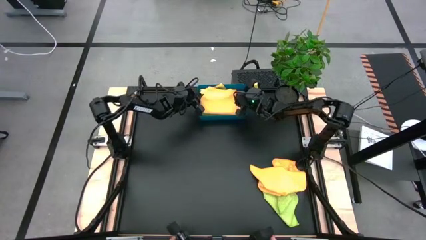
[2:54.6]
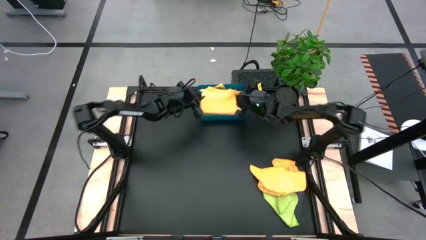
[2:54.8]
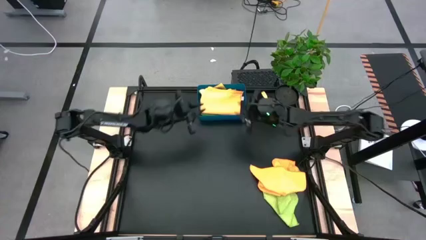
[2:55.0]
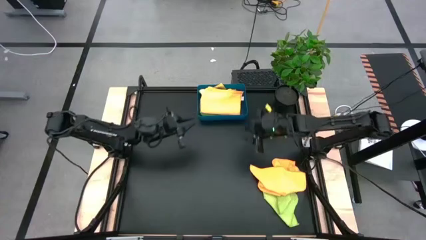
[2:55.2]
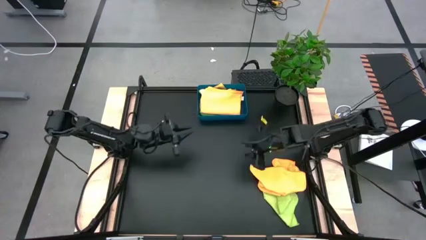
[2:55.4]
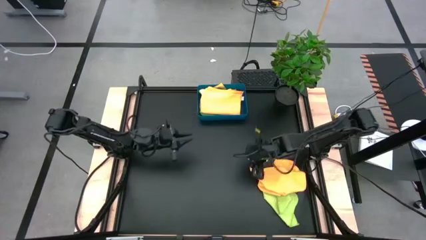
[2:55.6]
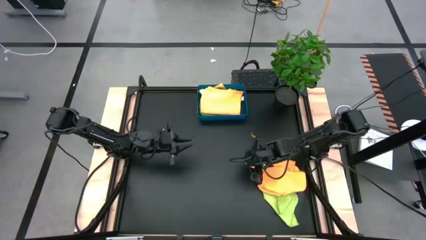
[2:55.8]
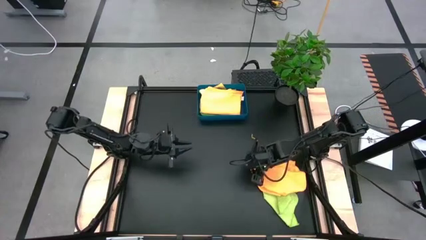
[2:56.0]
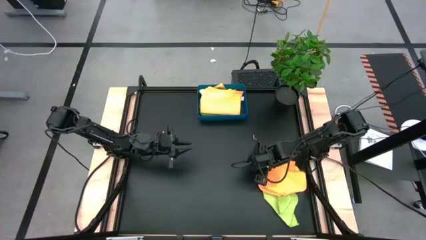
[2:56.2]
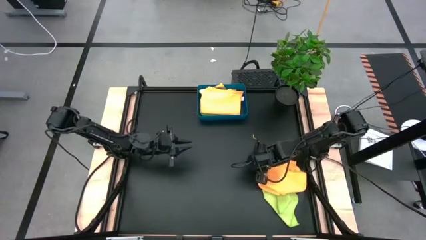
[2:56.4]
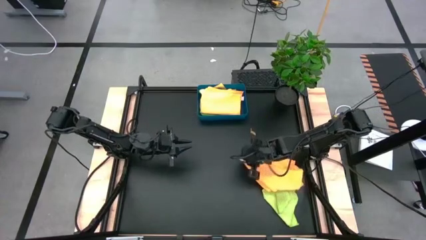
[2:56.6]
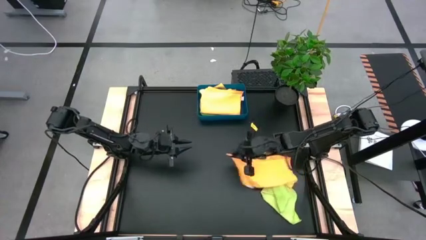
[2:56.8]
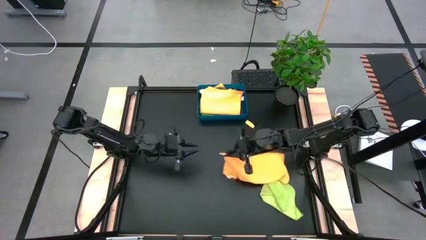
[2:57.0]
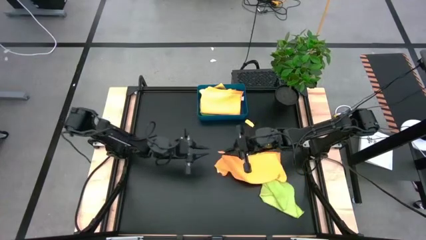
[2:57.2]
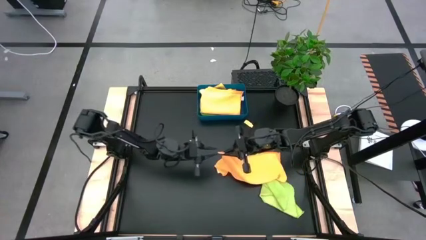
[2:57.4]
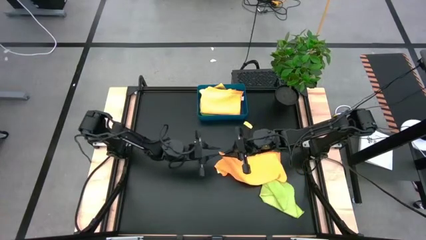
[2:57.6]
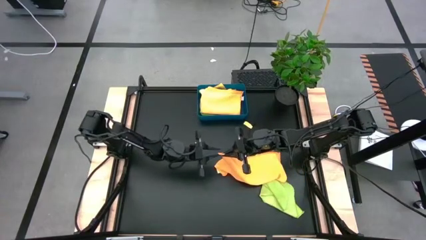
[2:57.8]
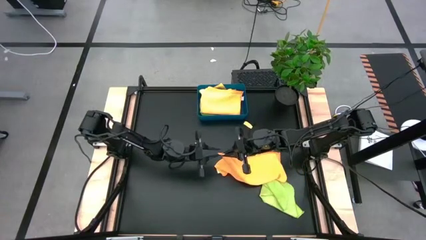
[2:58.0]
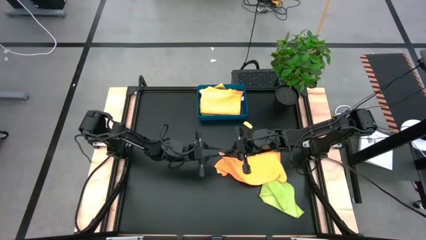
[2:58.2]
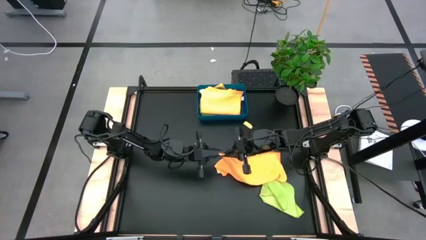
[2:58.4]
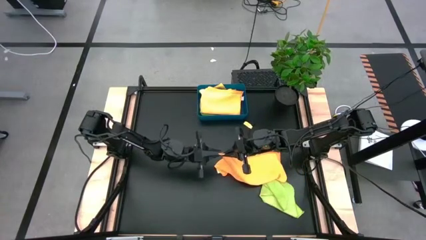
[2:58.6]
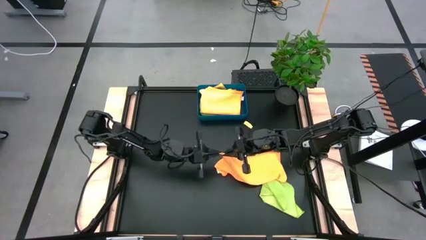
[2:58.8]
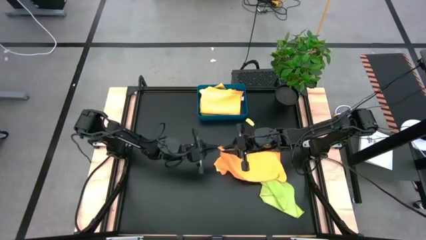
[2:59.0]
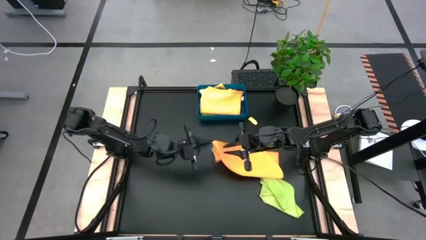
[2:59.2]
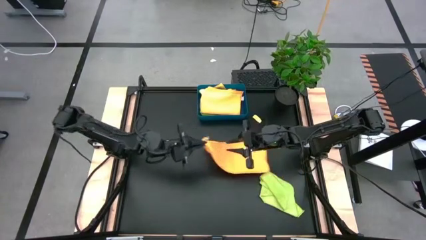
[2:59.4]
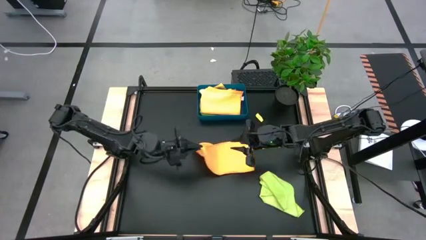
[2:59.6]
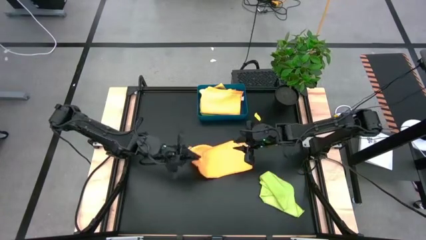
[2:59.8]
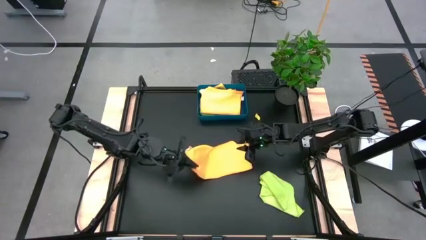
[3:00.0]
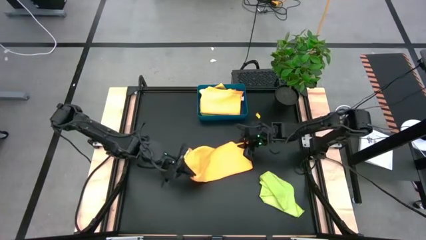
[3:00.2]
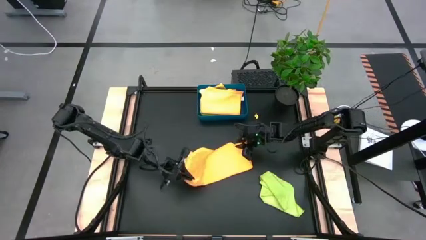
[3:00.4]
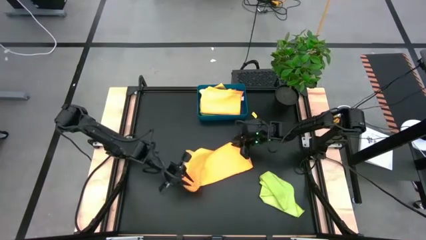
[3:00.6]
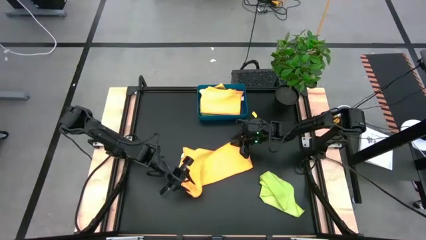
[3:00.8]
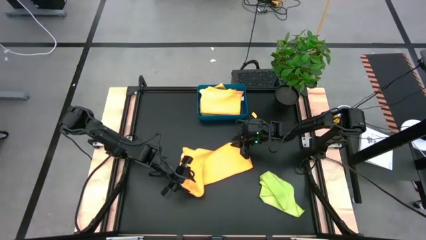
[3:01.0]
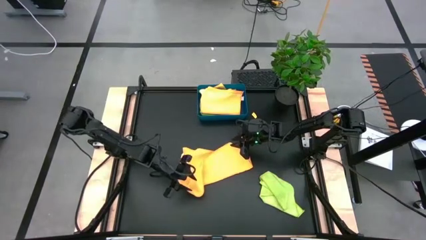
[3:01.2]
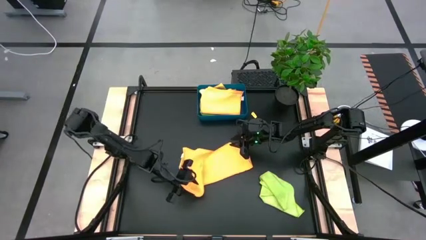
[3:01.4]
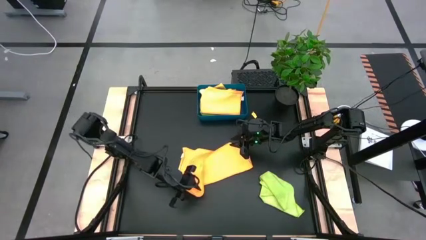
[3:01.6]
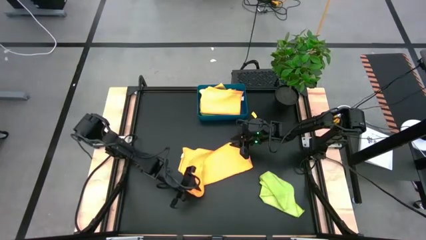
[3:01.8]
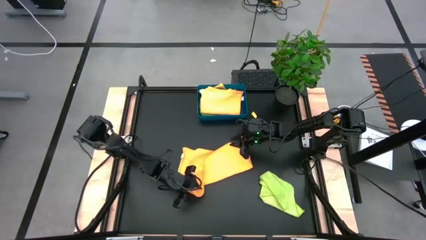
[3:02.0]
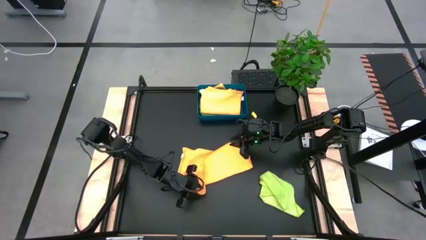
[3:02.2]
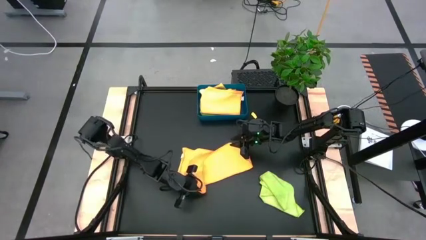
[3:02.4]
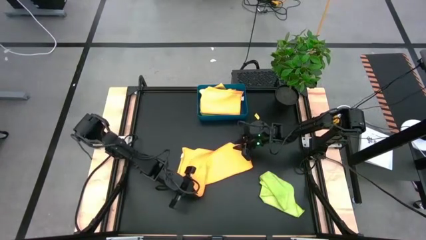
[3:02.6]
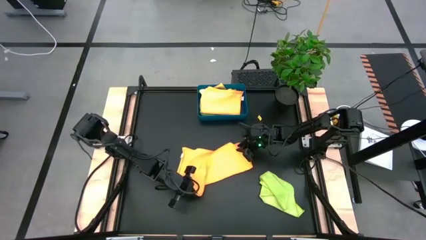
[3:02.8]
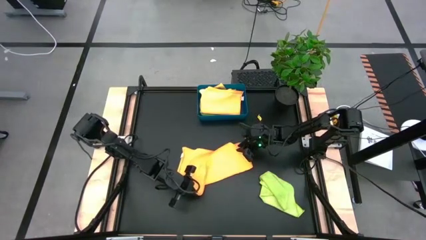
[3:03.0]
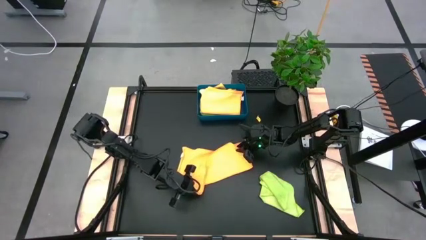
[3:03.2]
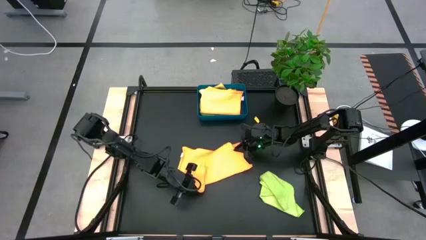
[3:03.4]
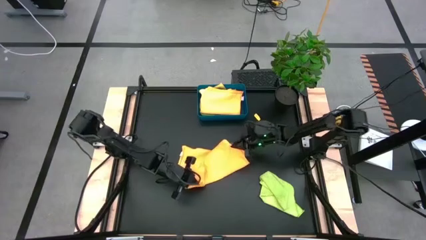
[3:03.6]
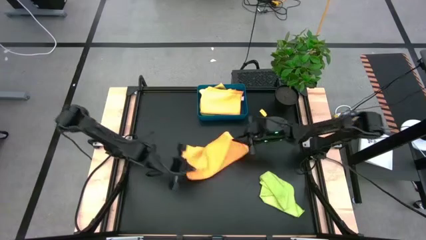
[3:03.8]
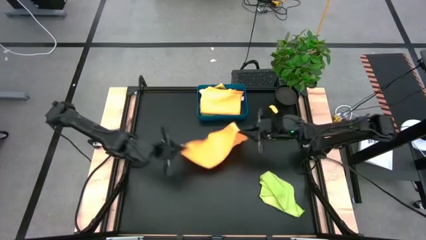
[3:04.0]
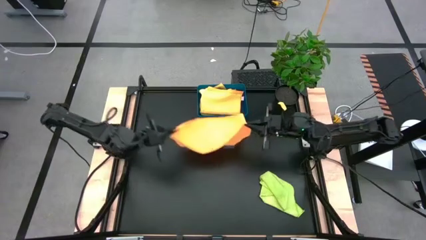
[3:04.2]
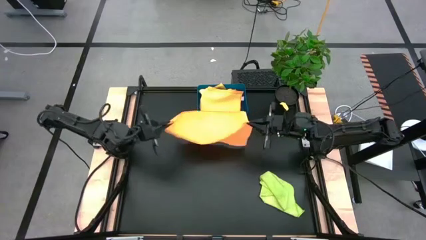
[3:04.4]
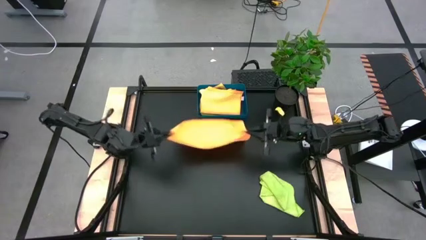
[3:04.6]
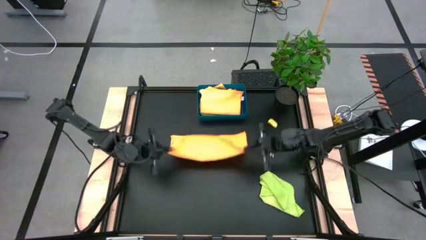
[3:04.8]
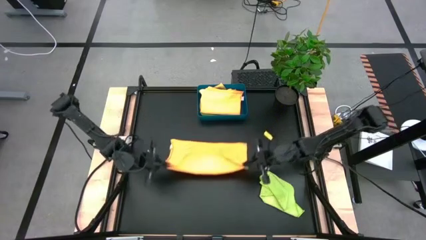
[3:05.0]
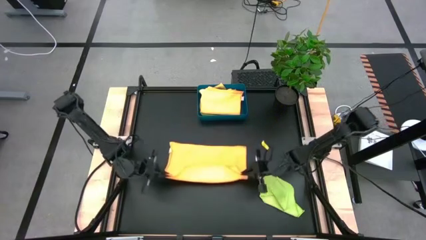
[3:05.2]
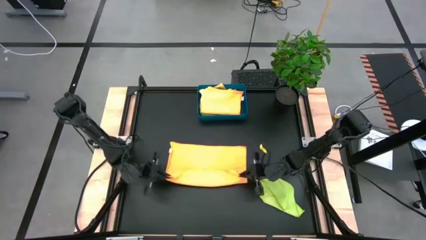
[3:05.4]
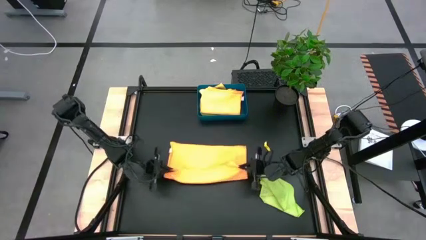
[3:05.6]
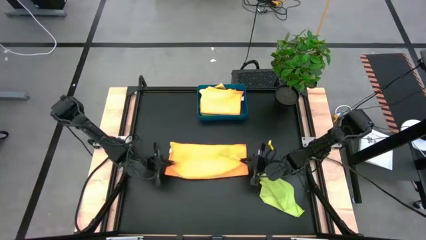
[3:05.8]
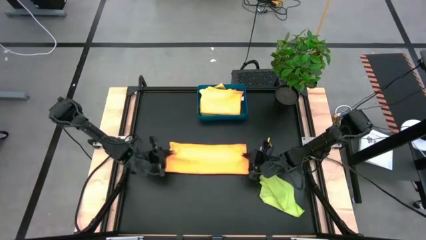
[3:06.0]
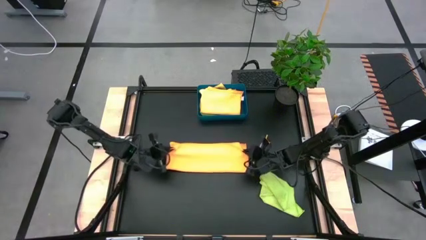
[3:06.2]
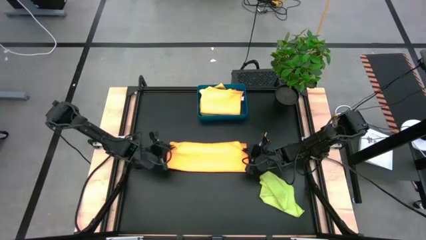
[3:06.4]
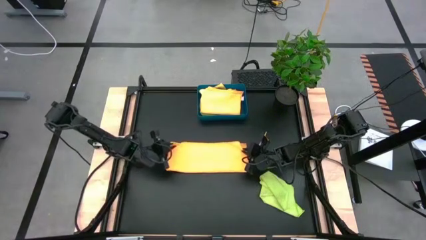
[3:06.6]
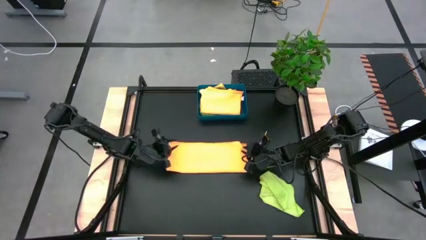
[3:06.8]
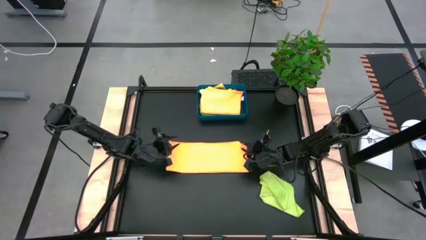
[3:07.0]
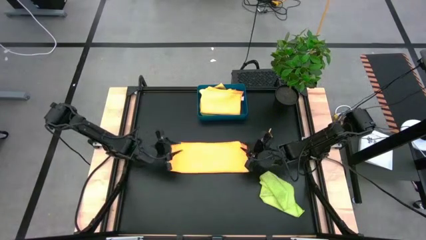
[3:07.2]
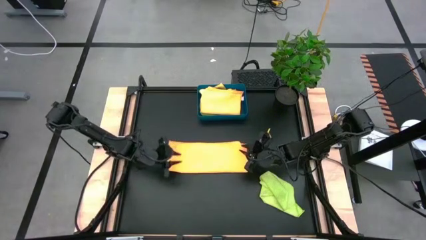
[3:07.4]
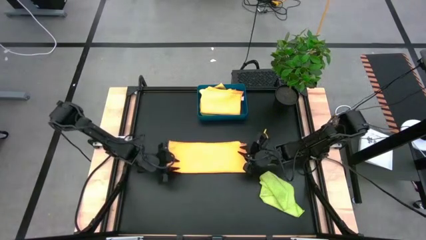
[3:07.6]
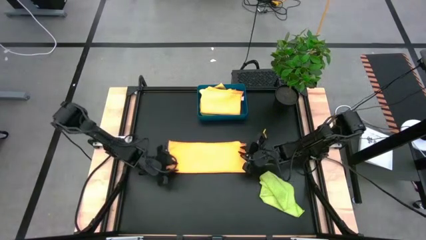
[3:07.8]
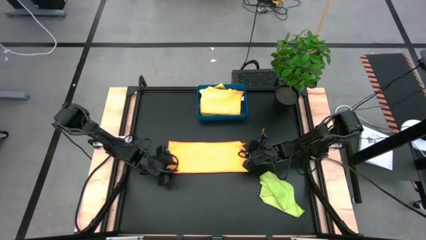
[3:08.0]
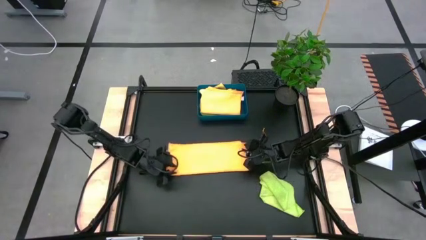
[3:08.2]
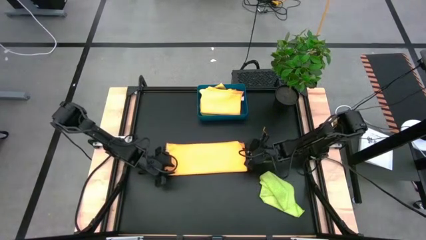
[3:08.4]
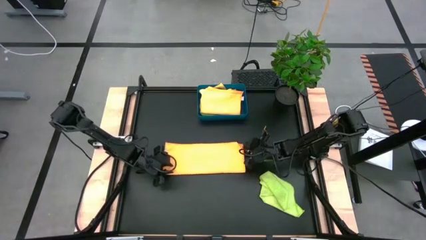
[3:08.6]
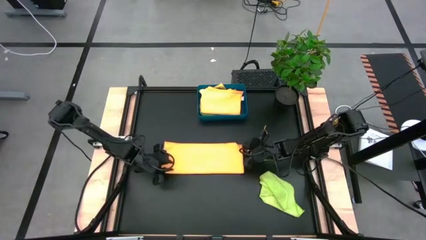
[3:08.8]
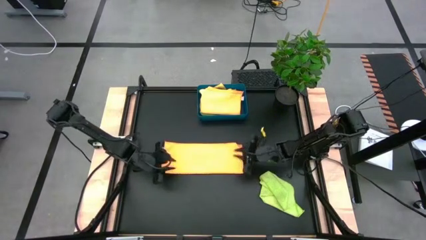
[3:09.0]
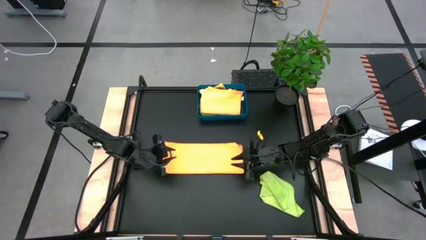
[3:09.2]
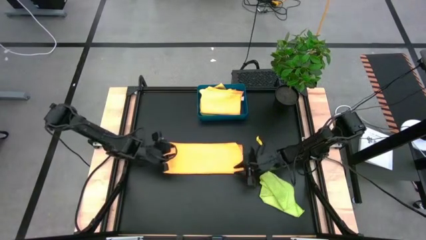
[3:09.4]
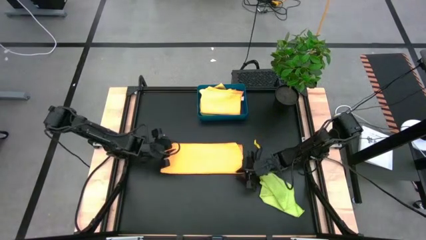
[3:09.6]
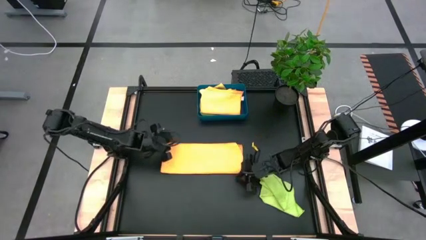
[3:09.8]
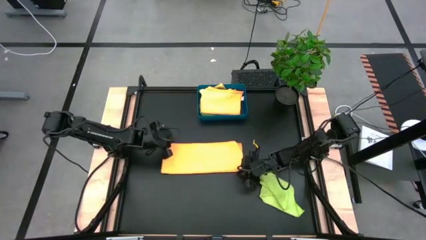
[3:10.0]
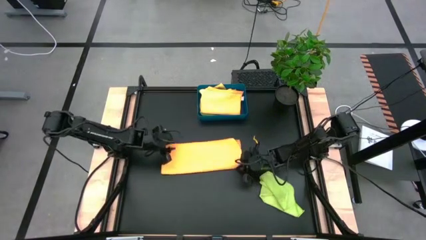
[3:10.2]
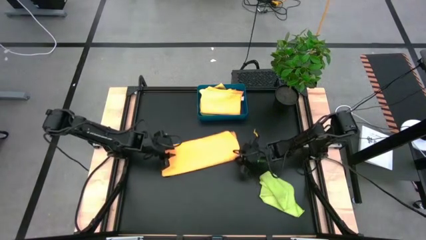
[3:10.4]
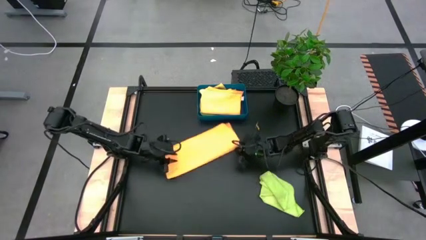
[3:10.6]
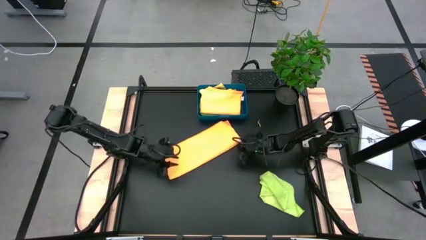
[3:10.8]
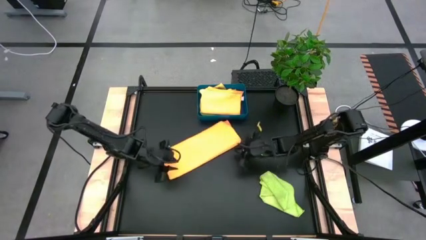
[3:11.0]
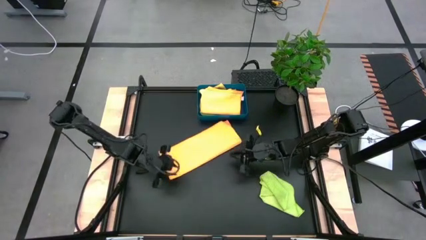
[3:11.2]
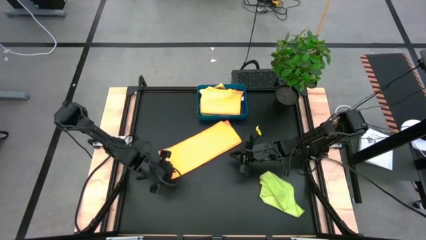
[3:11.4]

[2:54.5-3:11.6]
Task: Fold microfiber towels
Fold the orange microfiber towel

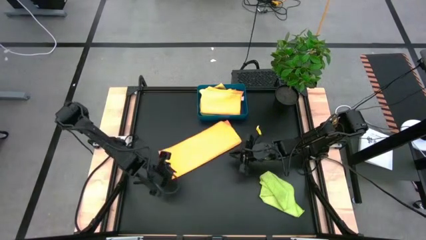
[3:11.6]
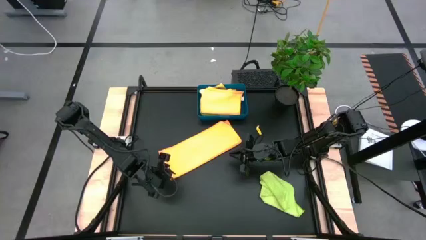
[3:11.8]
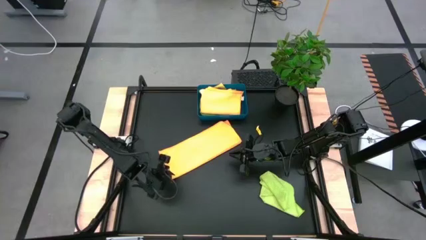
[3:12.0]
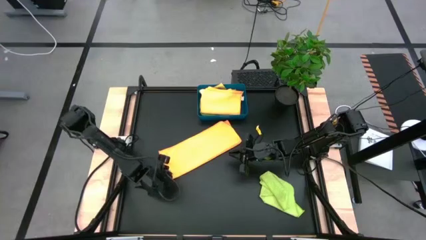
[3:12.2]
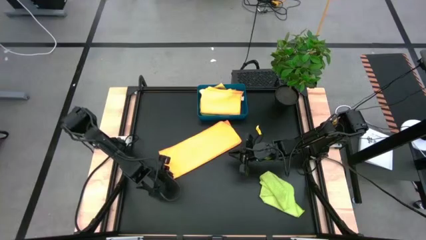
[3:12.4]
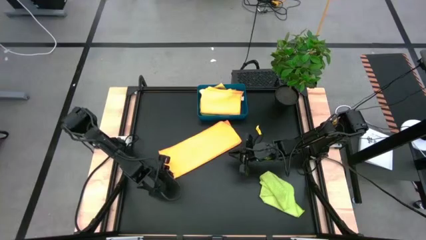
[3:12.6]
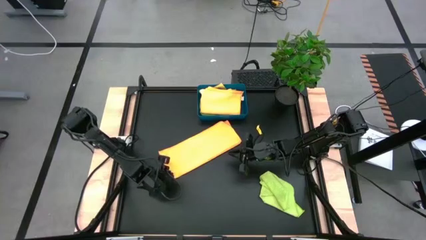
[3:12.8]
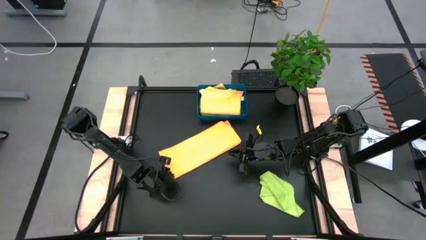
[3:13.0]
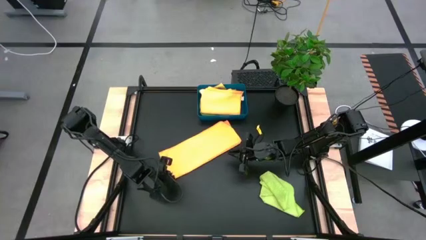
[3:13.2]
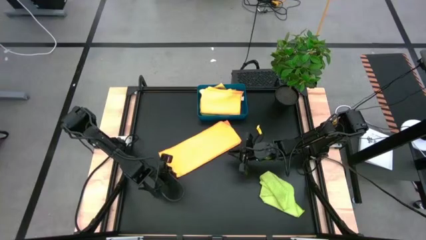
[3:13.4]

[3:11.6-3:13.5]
Fold the orange microfiber towel
